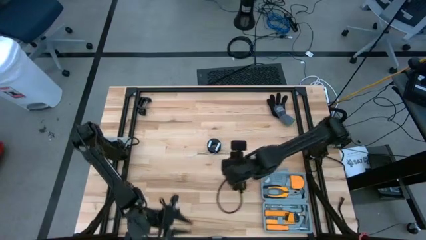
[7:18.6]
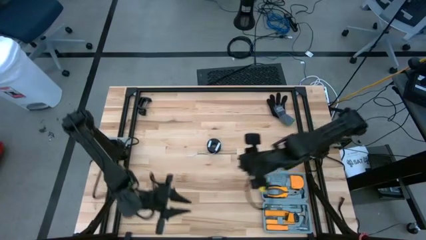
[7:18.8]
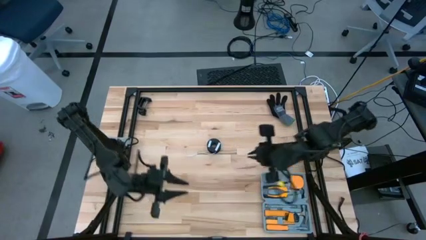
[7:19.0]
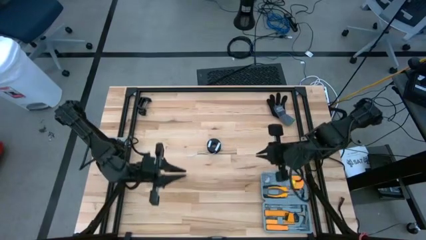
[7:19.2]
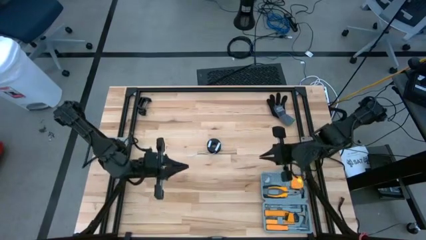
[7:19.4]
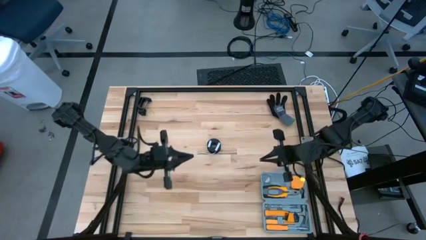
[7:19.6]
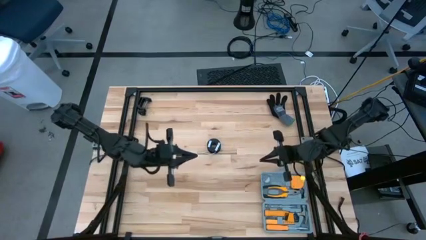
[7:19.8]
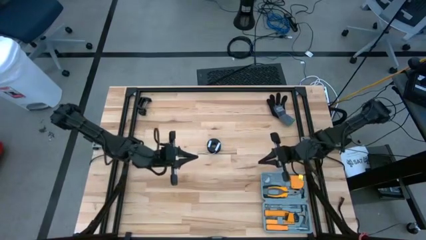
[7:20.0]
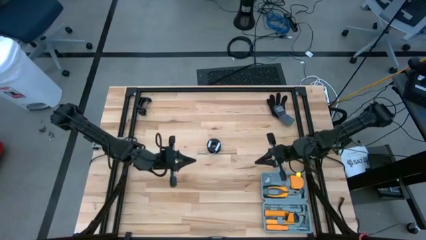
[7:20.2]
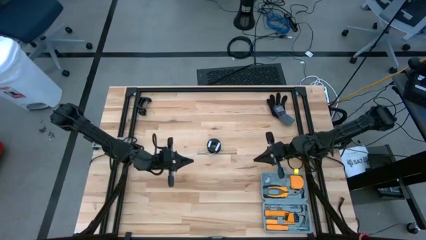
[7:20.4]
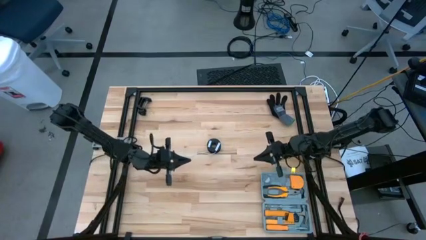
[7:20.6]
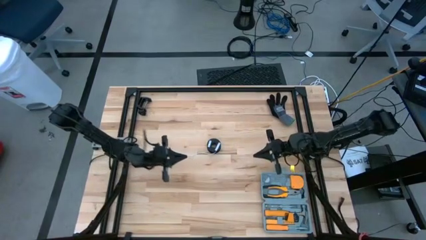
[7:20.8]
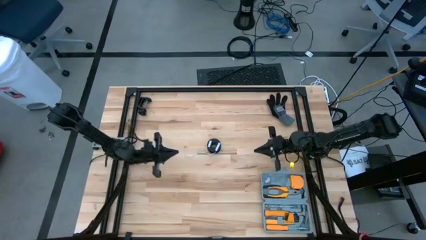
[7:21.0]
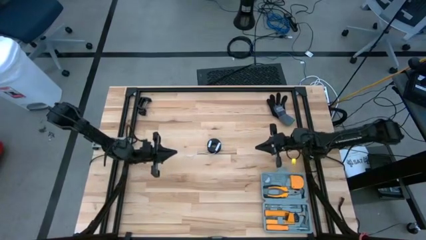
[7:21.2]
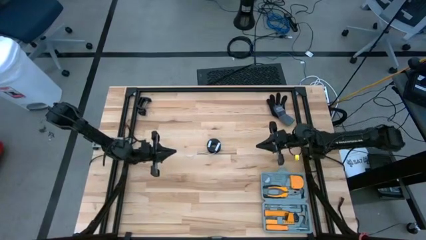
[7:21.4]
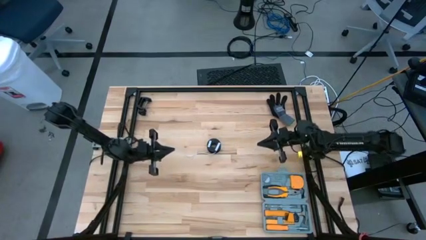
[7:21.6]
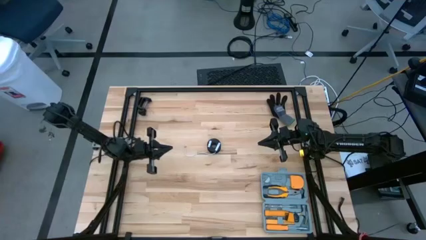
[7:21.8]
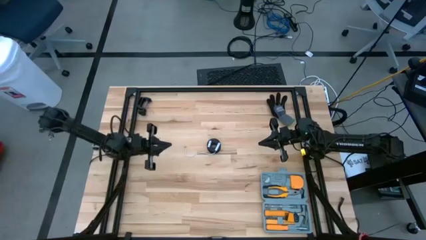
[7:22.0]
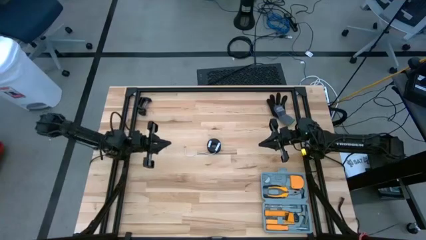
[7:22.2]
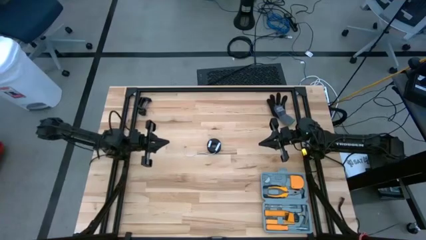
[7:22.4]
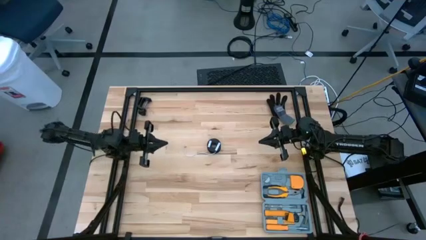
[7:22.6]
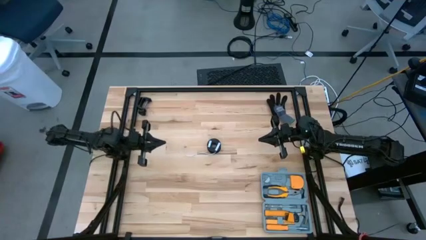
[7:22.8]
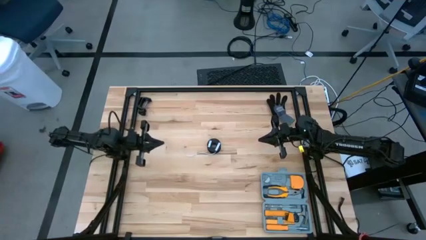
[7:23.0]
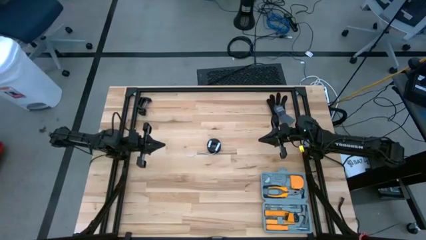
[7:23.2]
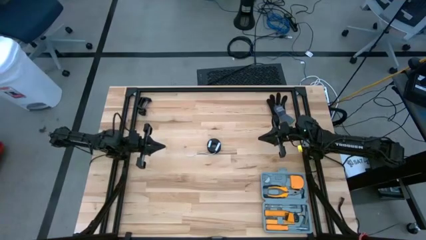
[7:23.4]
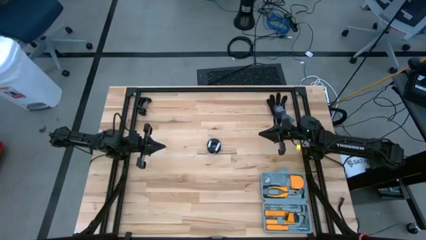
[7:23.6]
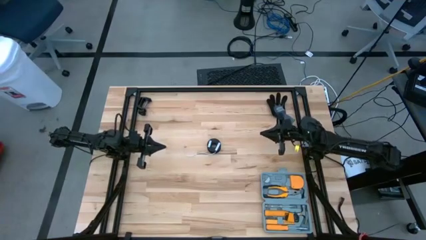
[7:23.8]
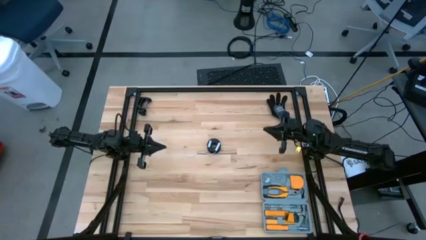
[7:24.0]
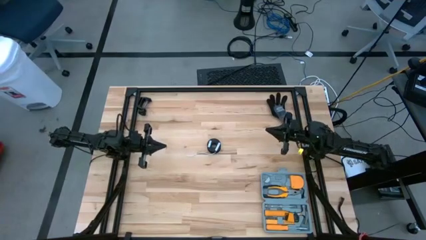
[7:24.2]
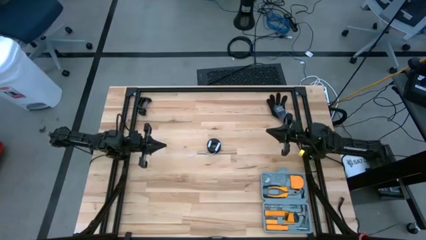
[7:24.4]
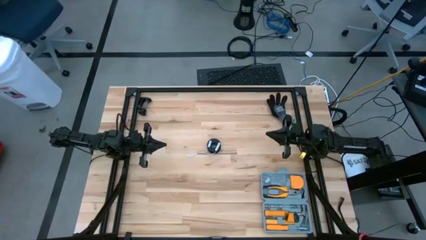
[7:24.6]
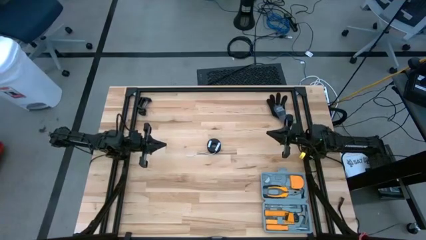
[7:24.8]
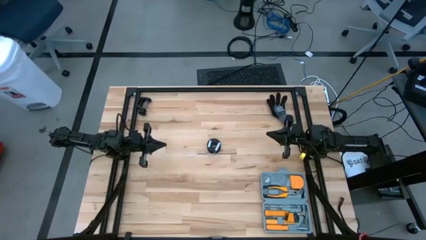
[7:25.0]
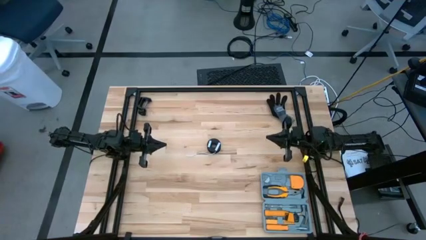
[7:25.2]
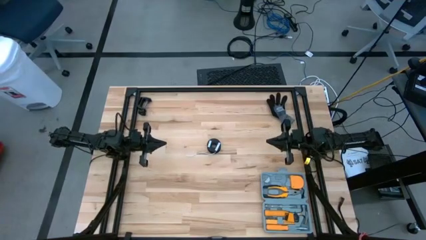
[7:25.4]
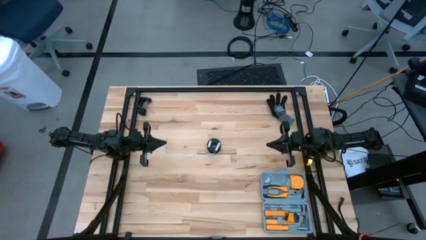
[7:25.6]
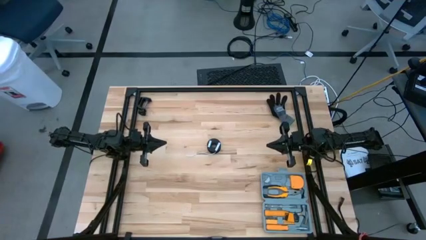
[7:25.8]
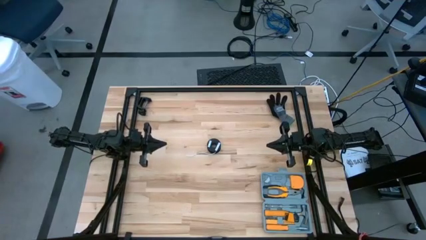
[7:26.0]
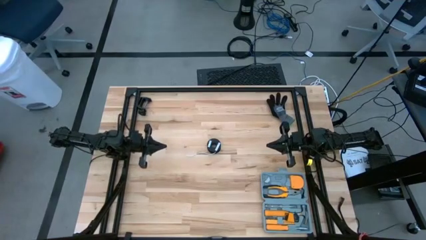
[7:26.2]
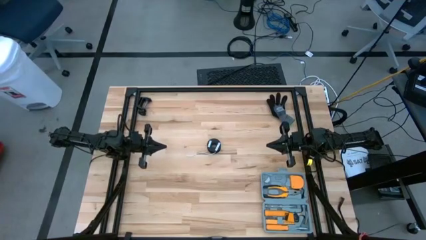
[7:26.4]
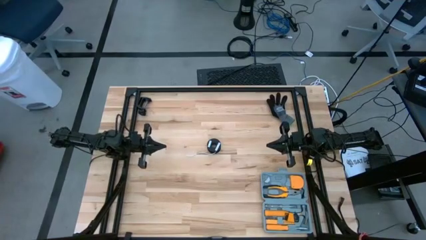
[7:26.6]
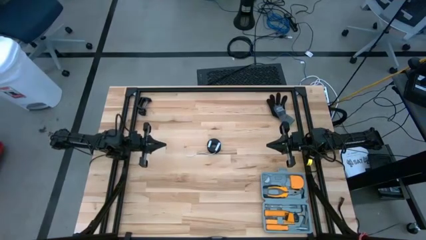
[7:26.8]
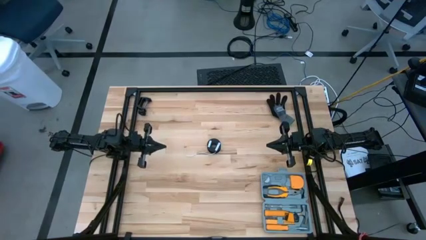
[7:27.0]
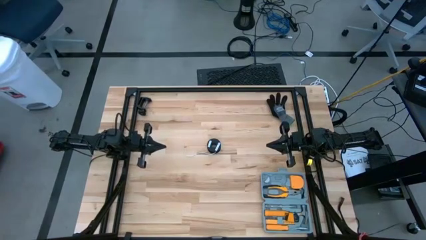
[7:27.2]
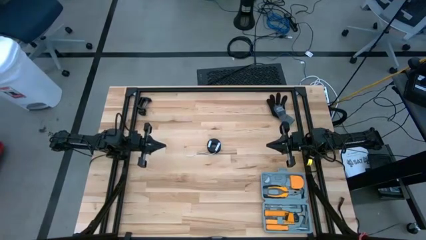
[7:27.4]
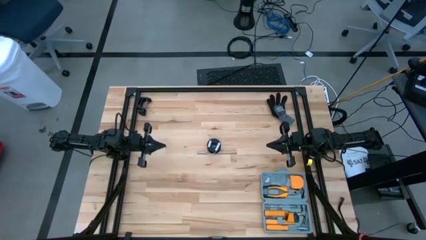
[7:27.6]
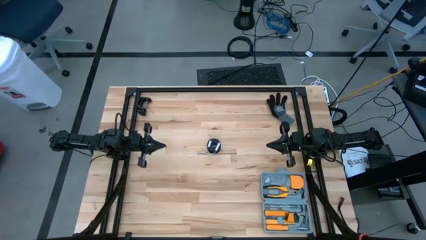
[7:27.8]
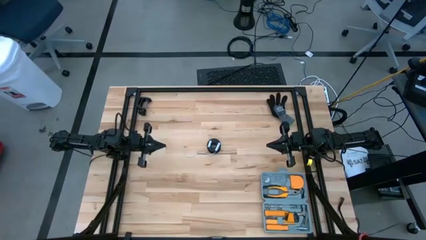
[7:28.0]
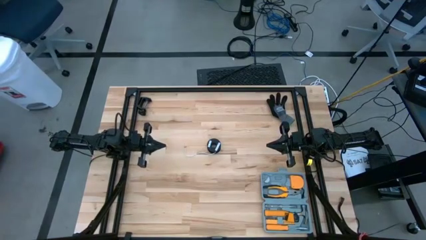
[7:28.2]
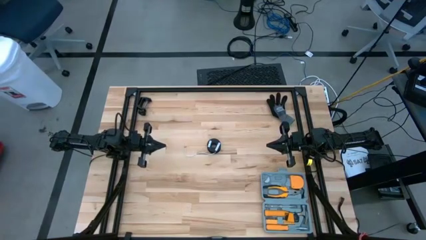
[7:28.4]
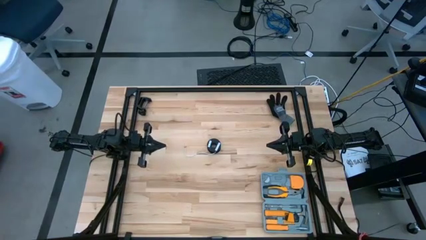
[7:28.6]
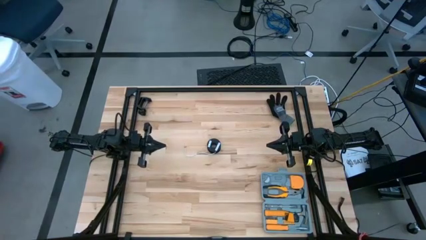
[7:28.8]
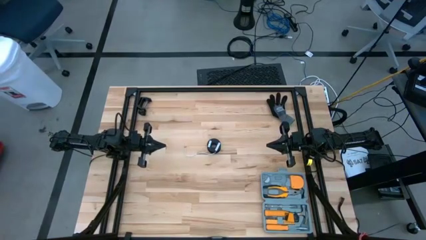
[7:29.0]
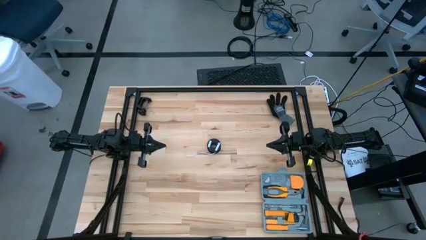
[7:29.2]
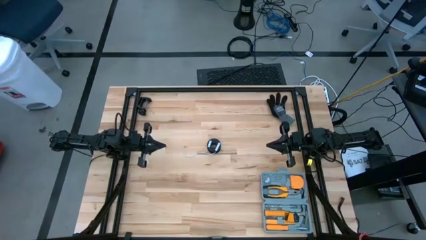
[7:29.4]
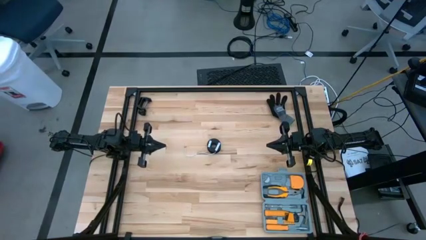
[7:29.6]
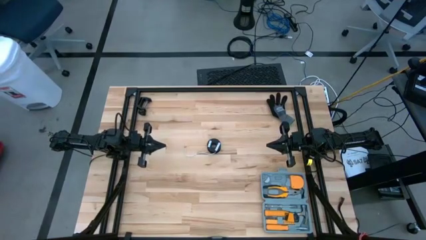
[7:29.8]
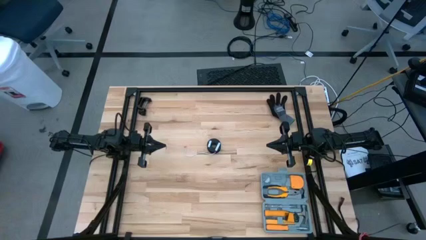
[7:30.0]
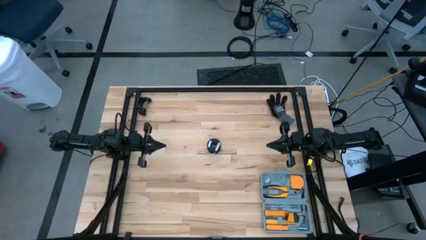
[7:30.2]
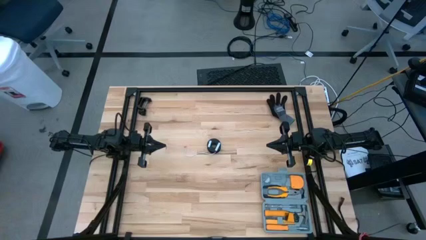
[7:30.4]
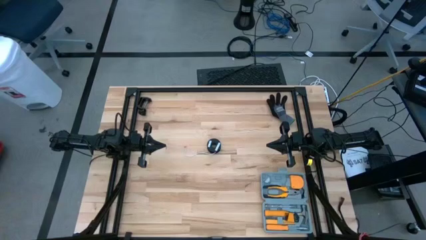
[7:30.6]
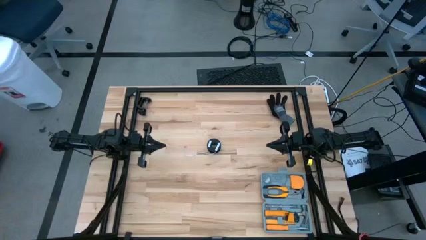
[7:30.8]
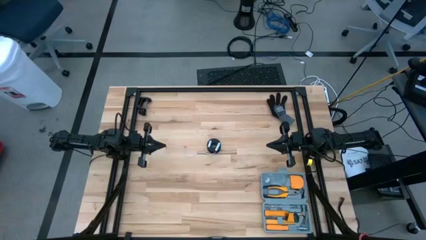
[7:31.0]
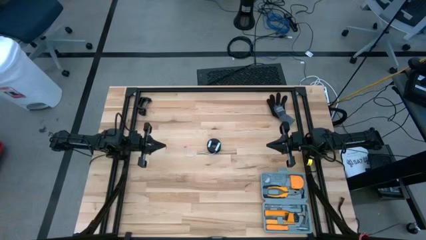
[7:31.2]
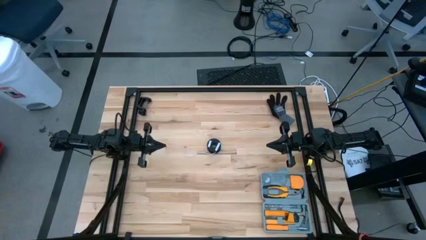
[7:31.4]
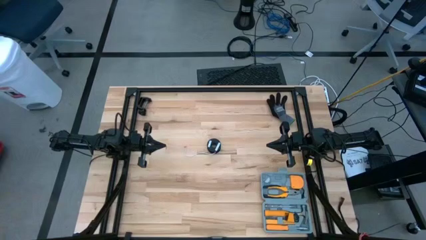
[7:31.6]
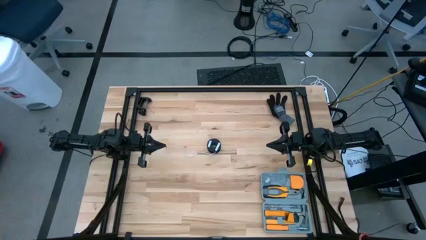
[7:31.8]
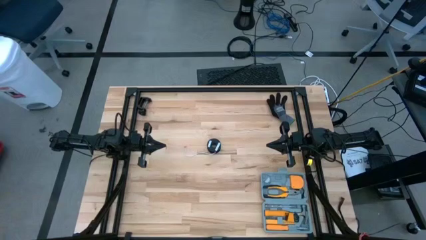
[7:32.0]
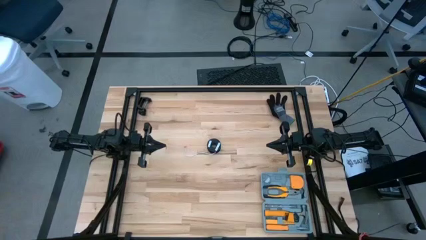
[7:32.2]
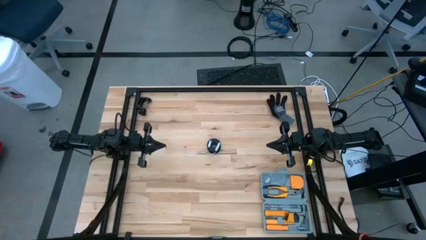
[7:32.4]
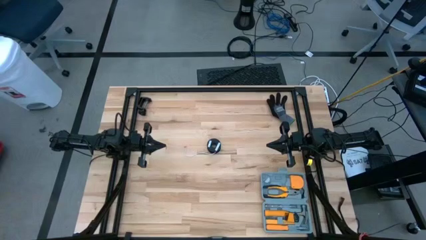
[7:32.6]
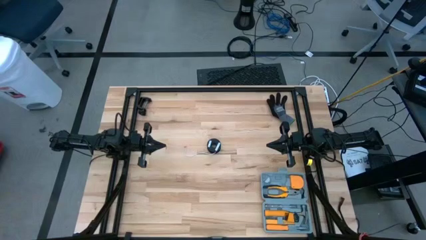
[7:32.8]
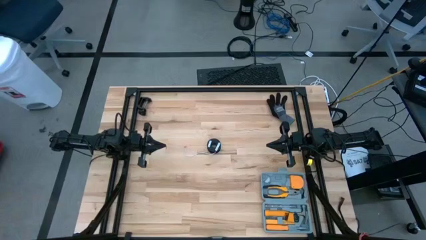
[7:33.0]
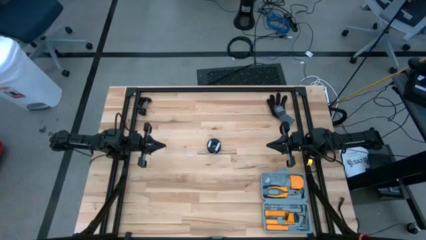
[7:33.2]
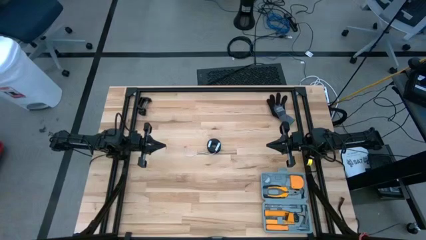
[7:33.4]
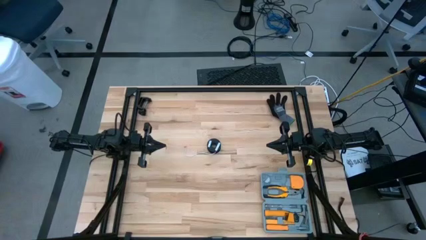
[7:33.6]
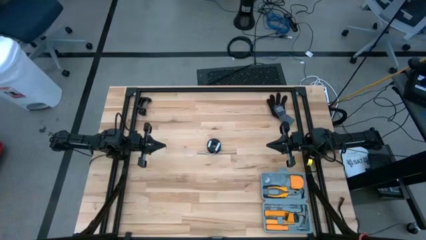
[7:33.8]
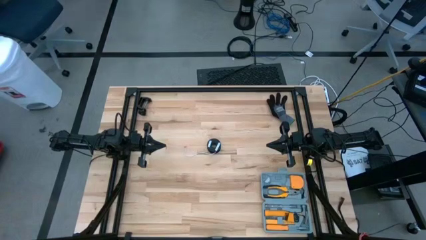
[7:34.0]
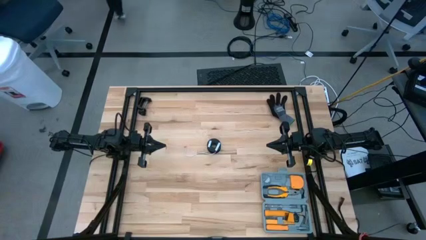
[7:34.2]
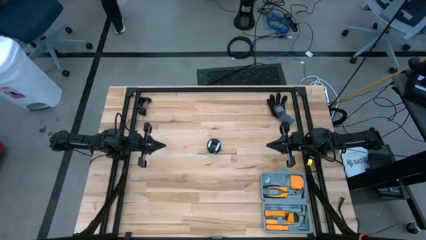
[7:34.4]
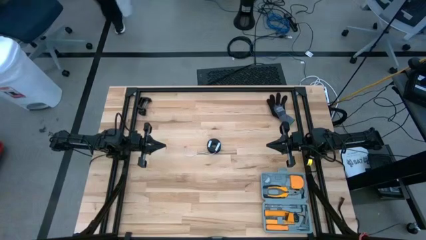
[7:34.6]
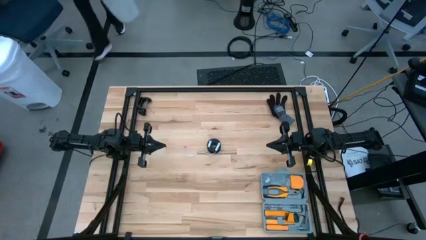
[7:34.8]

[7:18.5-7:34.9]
Task: Coil cords
Return to Home Position
